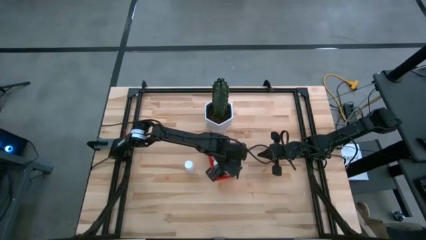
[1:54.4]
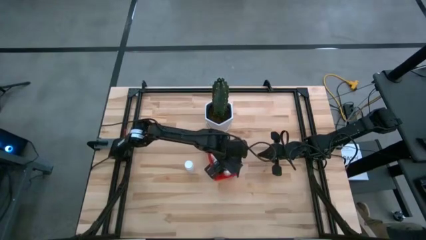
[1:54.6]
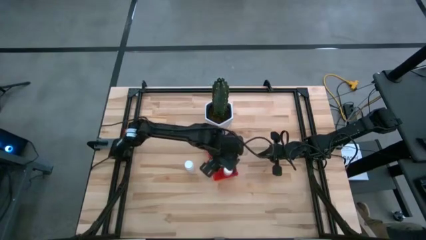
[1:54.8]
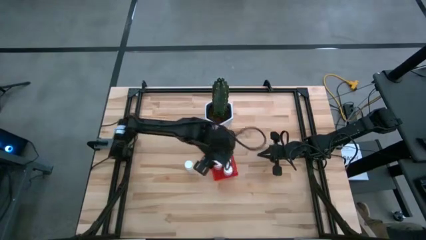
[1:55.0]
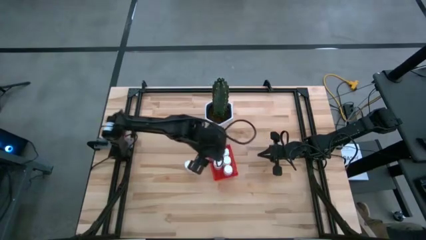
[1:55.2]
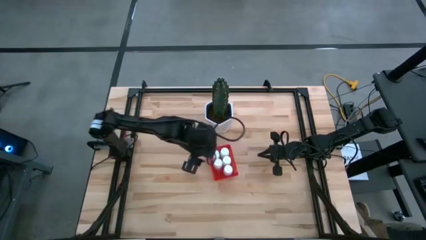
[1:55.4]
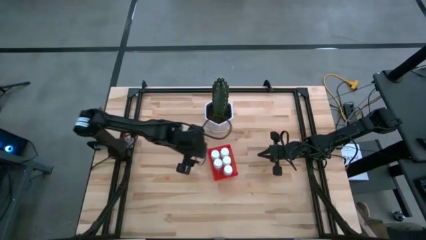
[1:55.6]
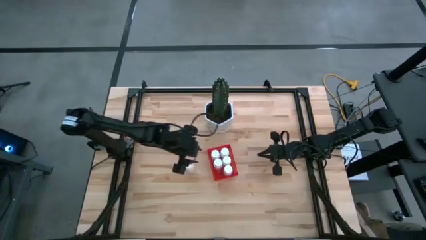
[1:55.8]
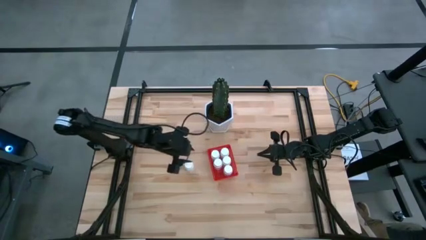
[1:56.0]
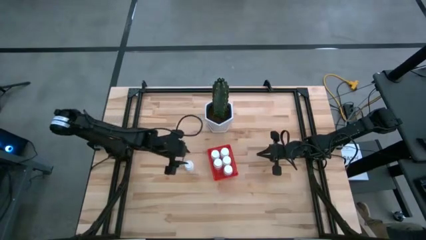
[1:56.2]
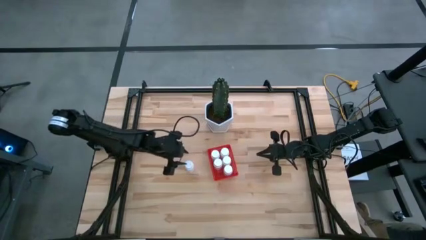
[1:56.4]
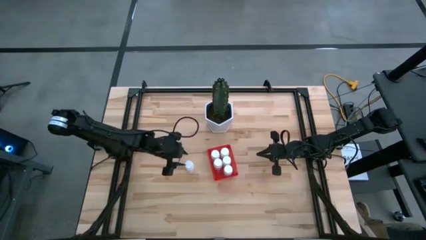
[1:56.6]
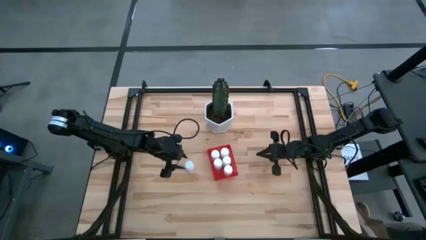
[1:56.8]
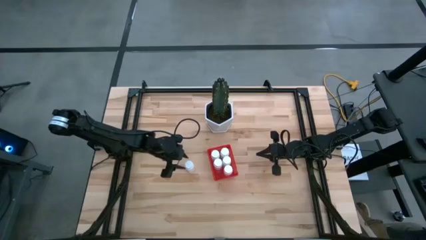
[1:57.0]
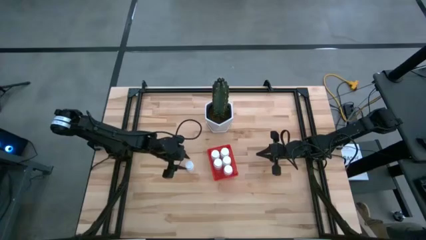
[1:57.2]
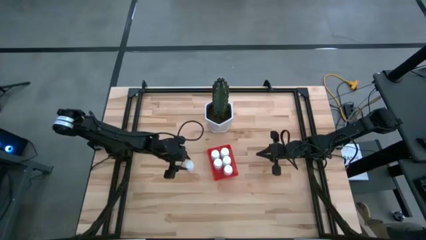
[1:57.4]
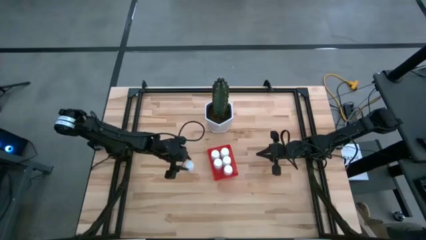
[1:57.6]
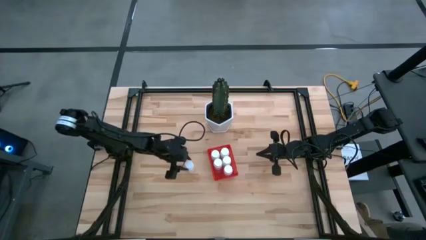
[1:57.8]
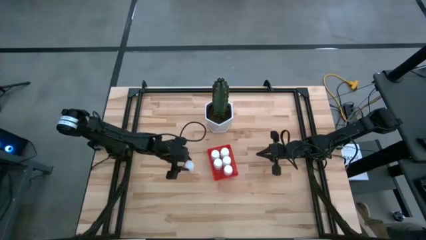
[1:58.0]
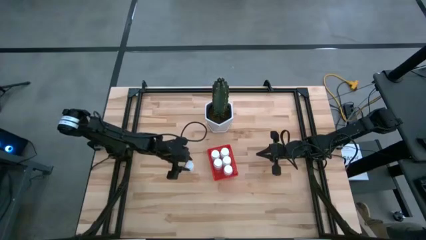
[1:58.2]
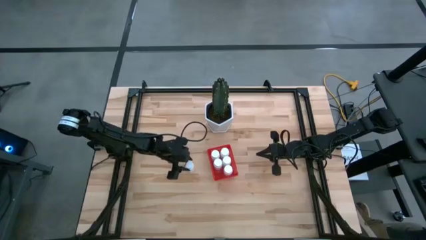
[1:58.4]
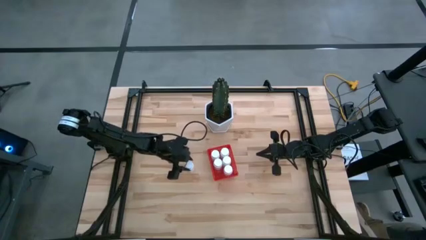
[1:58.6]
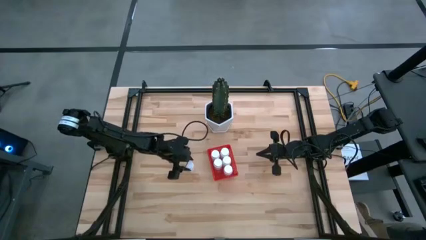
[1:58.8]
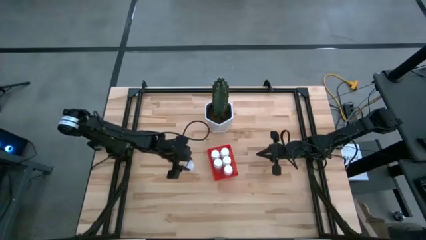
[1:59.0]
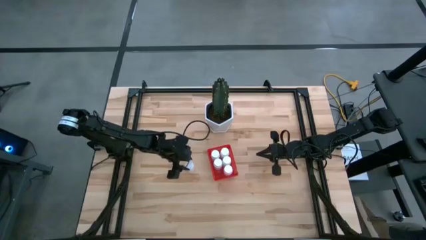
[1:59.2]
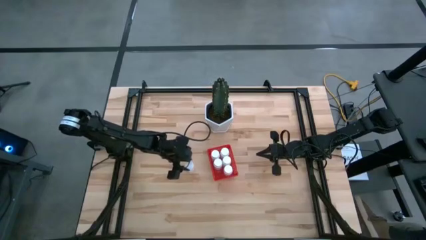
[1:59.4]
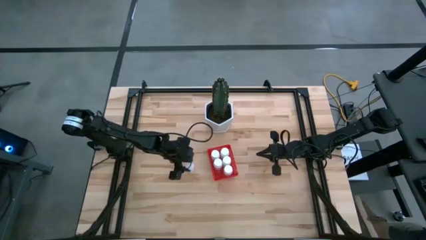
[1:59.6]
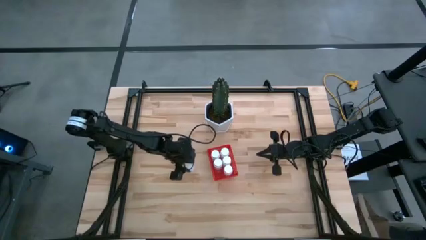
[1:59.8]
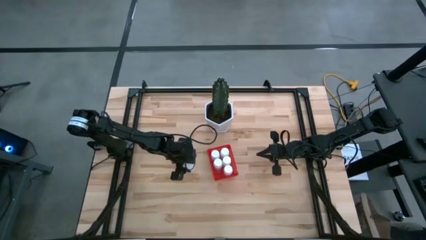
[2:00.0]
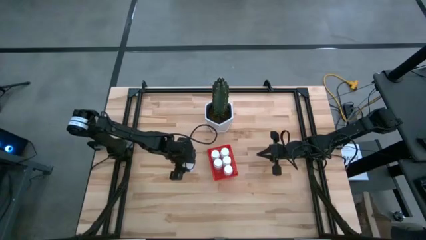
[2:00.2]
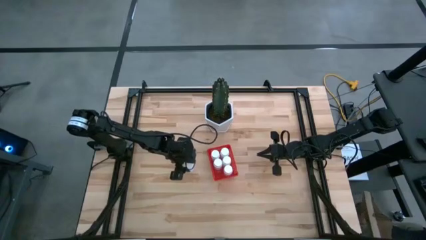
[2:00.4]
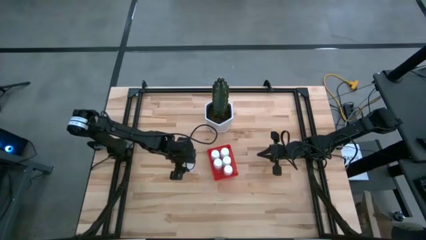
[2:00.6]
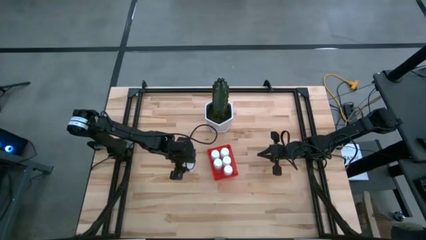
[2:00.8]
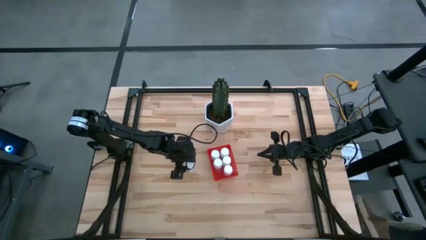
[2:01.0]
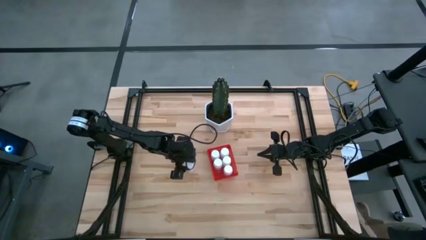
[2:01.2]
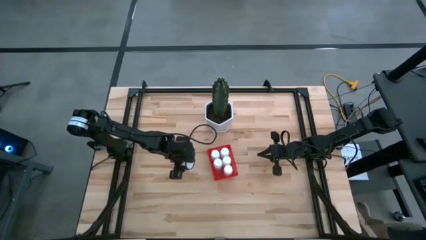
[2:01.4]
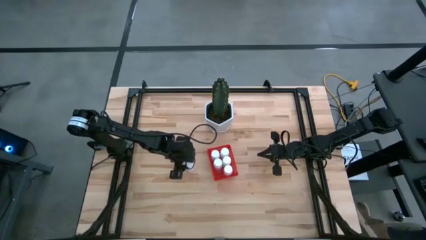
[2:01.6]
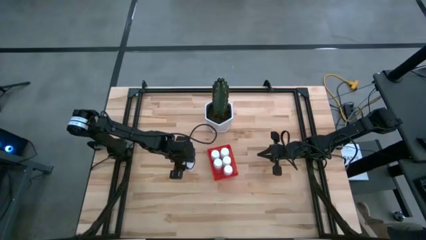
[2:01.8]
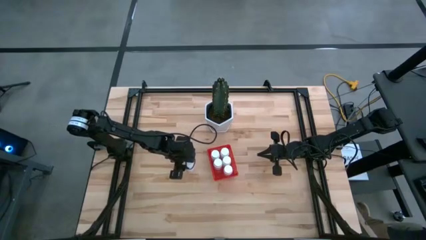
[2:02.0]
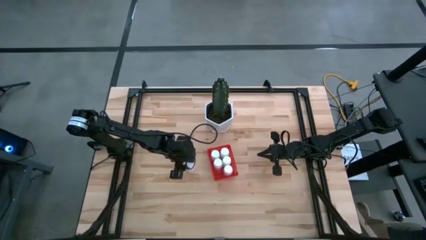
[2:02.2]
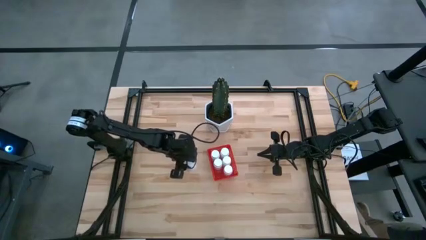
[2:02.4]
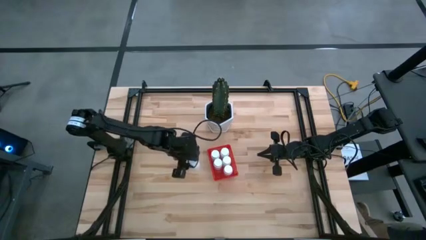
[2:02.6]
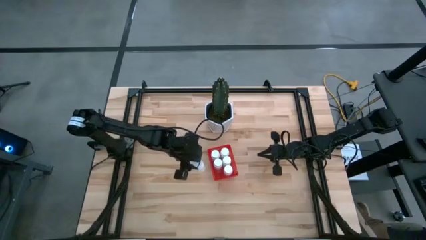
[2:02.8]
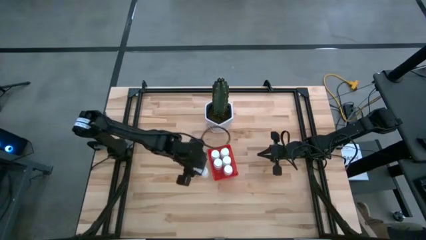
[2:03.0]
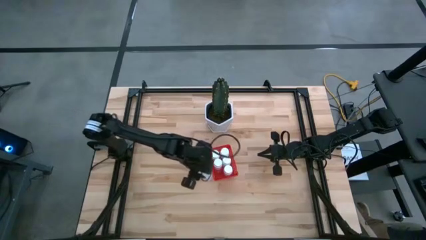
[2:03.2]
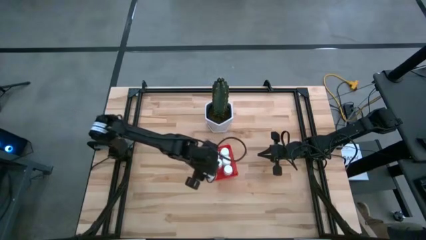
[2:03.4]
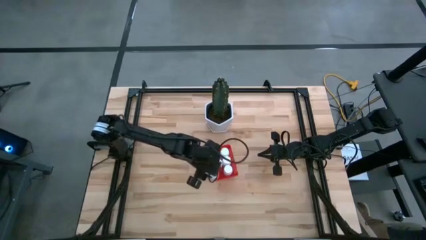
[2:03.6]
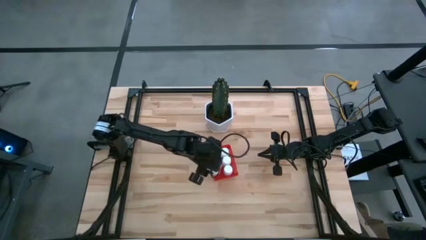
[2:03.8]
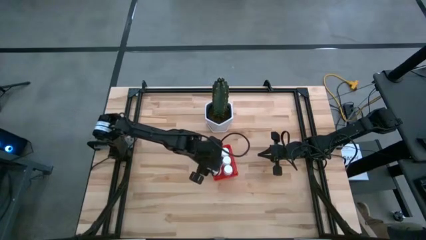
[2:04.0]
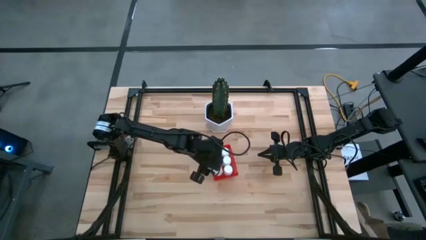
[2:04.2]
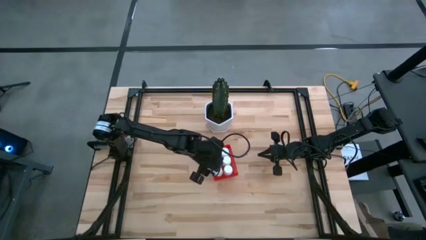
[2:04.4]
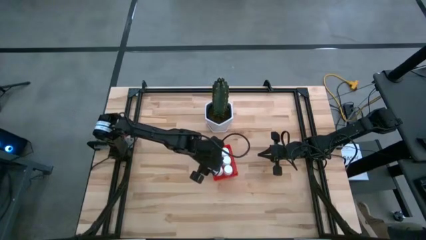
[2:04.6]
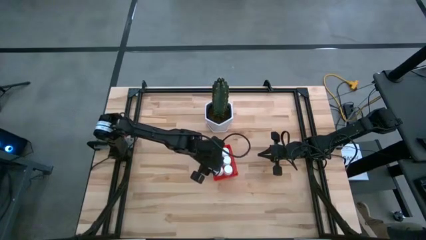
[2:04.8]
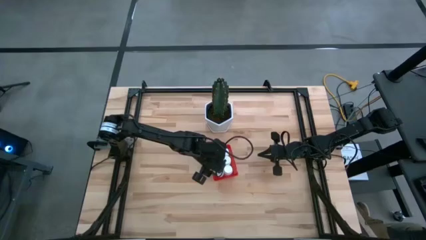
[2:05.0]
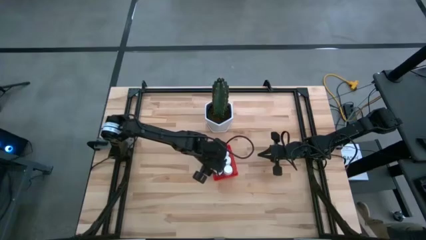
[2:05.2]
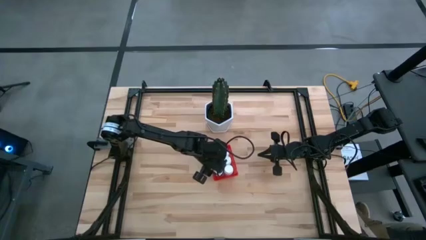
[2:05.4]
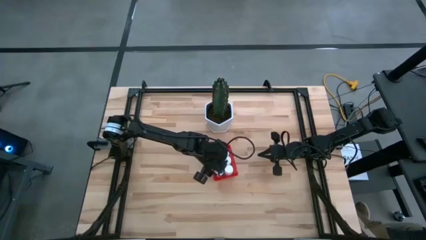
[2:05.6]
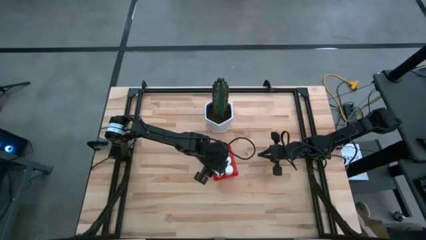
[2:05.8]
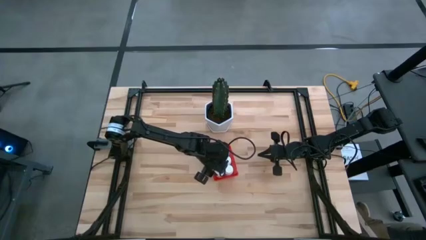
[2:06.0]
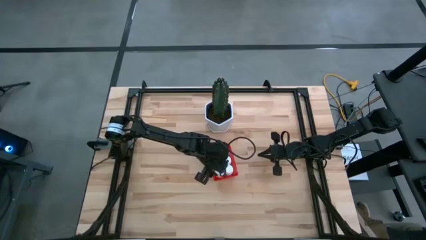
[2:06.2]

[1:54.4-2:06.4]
Task: Pick and place pill bottles into a basket
Put the white pill bottle into the red bin

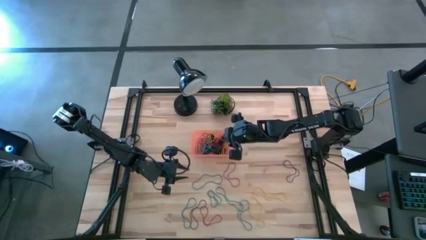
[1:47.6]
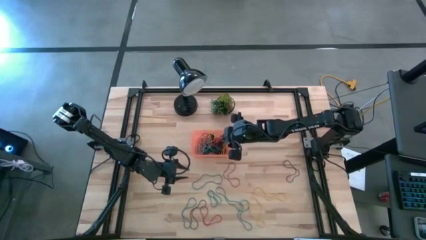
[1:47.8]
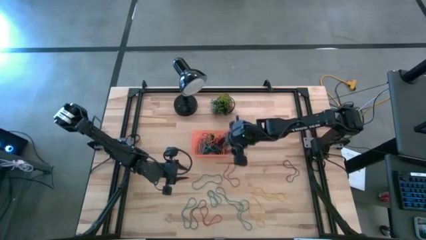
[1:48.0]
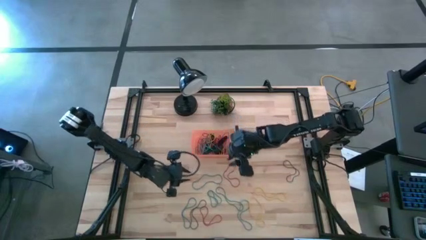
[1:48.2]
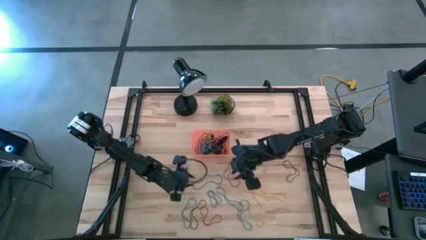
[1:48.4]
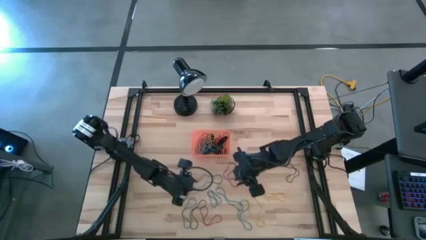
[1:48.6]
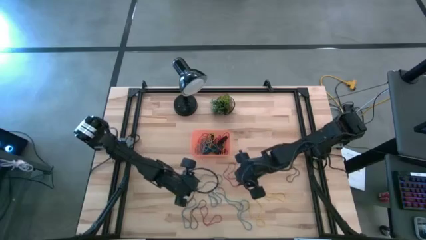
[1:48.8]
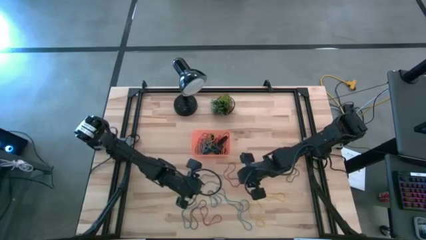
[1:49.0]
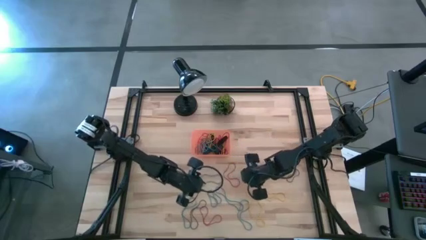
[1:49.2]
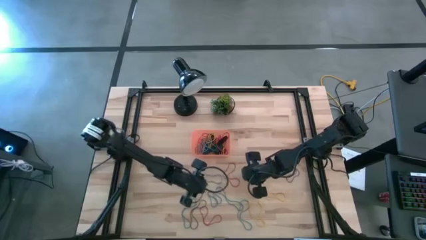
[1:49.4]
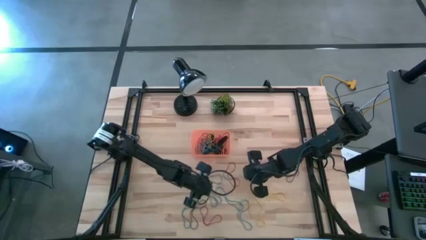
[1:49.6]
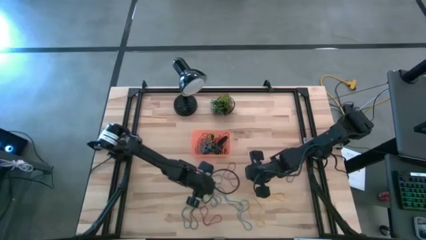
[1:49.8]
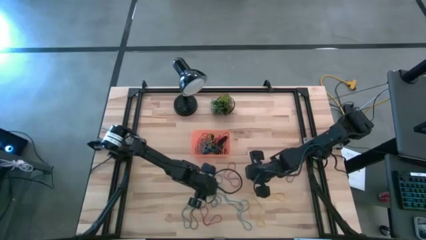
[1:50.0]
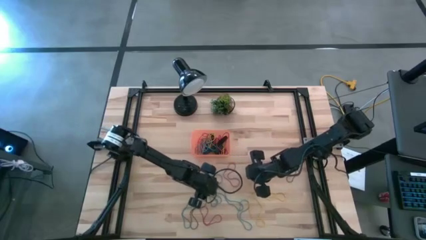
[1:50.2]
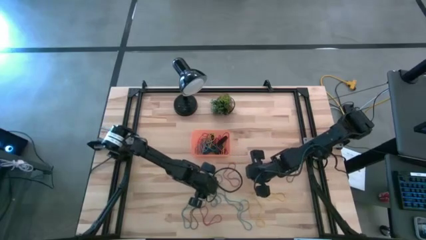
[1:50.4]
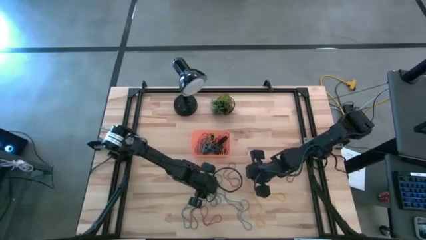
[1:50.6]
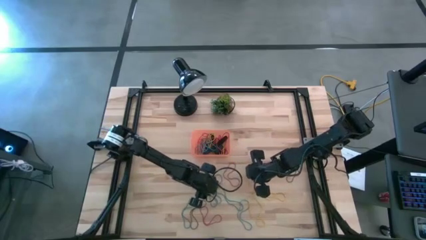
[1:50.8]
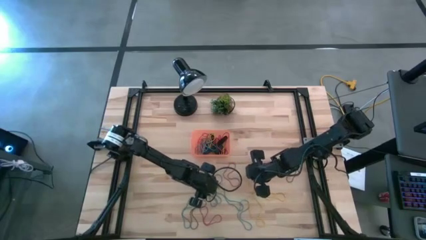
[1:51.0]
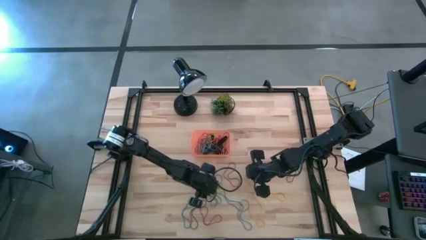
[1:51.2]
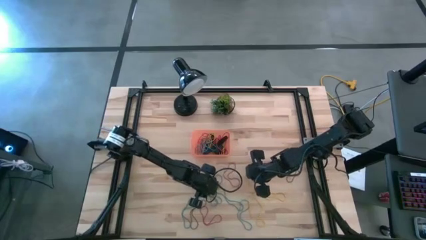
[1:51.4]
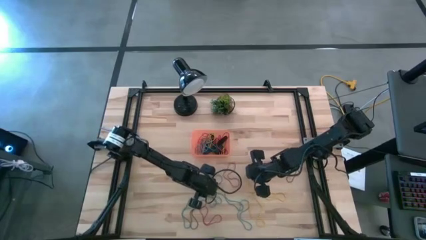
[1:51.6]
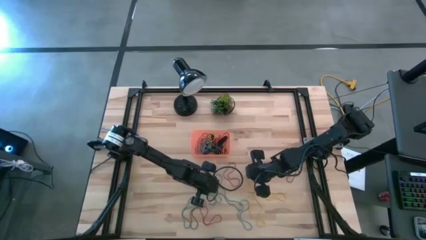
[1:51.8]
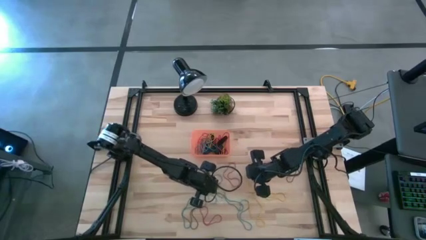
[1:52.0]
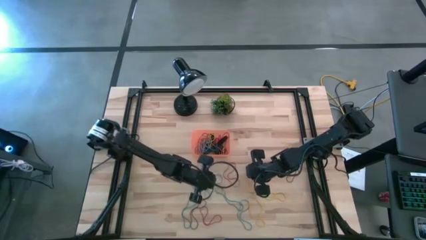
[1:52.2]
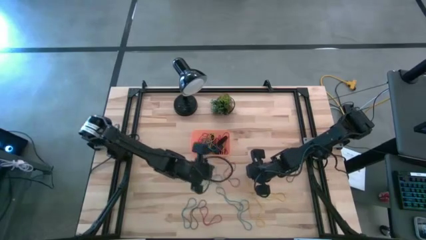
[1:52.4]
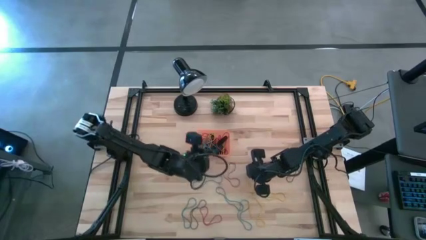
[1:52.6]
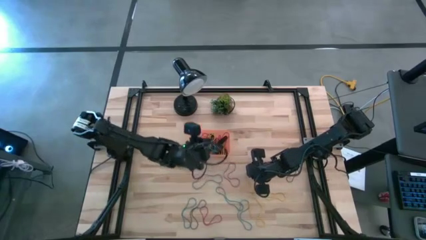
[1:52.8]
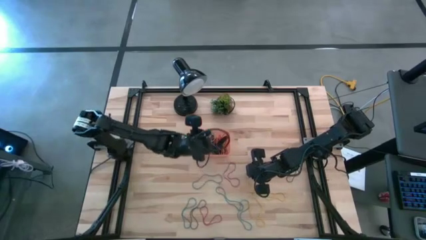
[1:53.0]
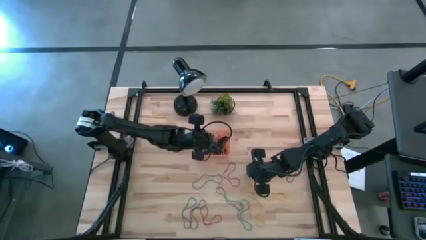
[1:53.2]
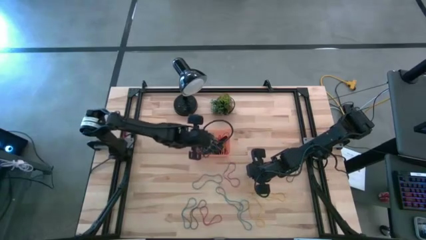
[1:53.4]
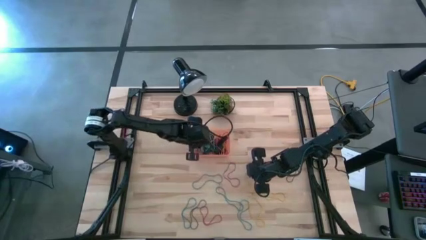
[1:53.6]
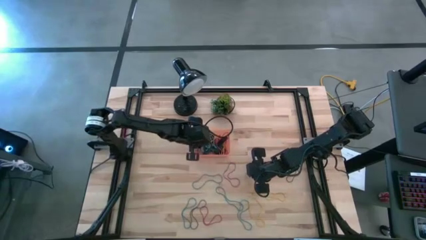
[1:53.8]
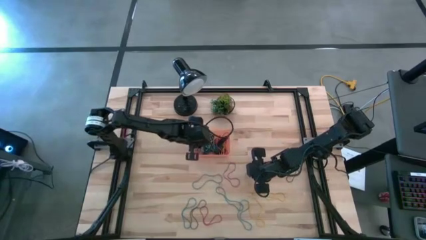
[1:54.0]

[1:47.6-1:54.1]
Task: Pick and place rubber bands into bin
Put the blue rubberband into the orange bin
